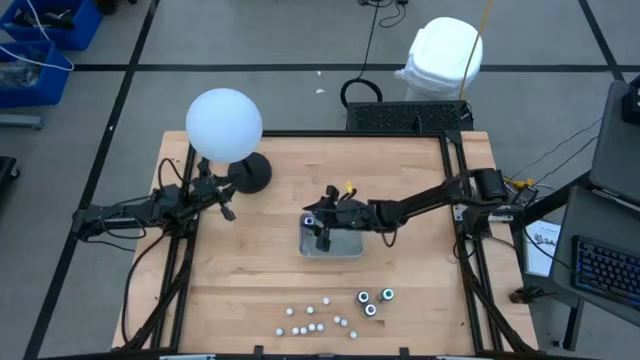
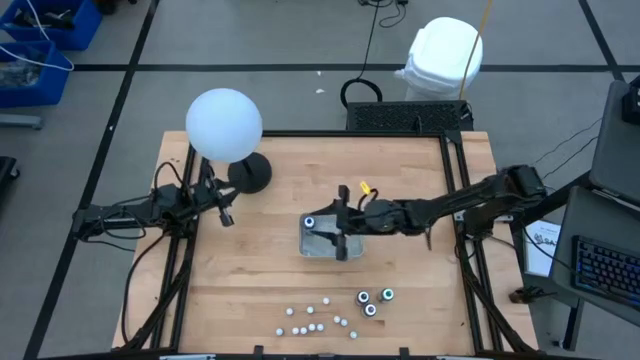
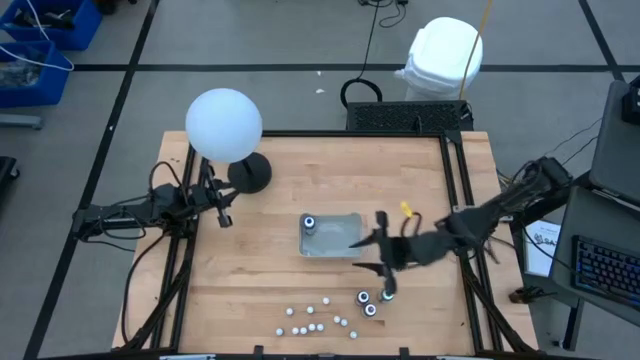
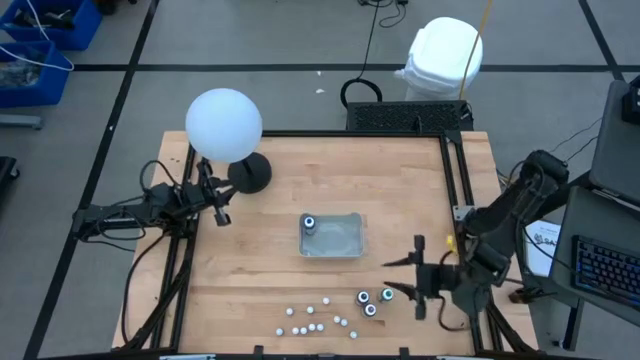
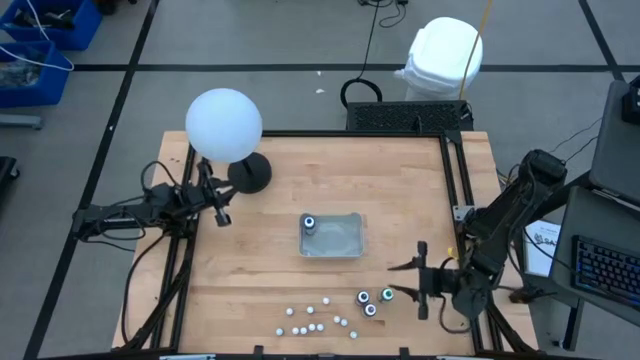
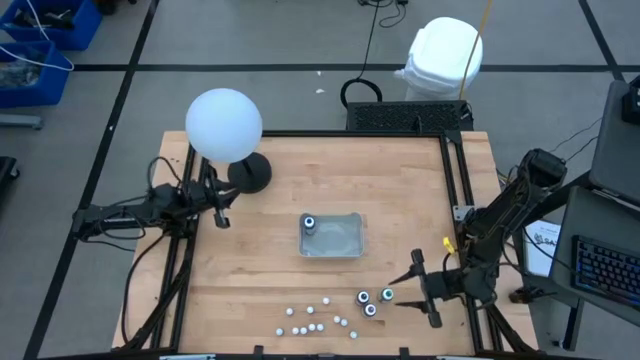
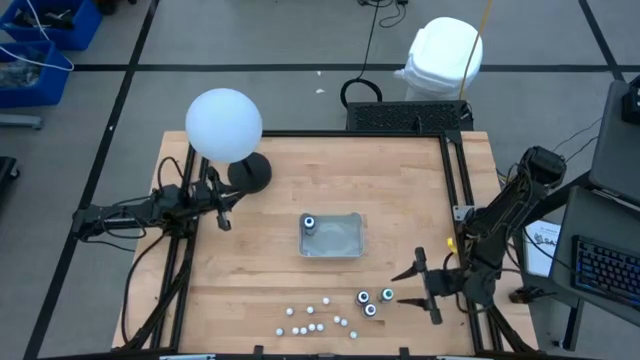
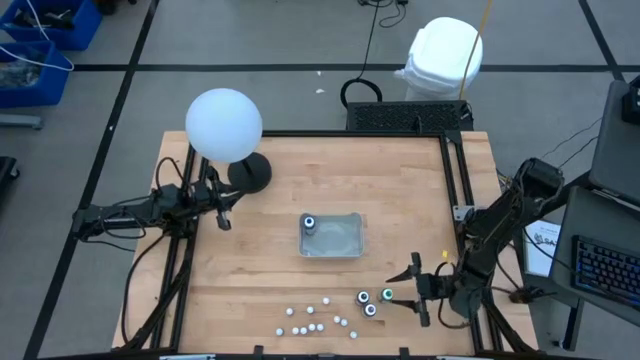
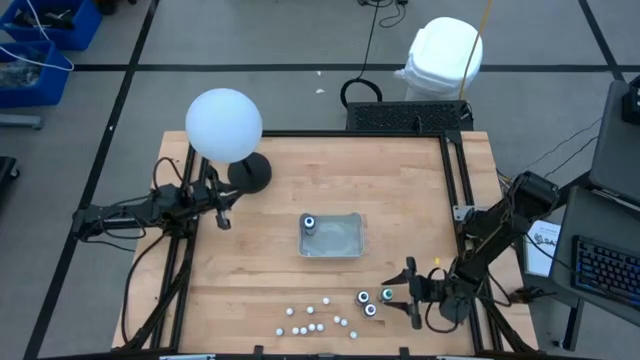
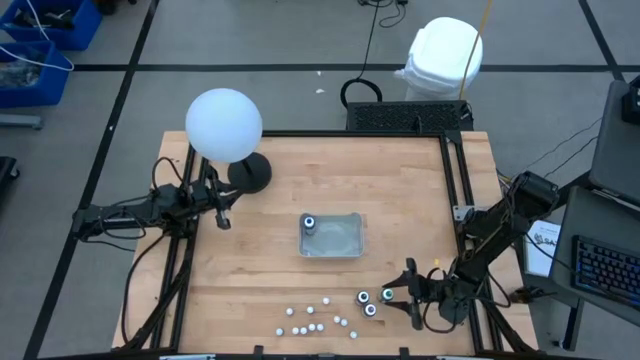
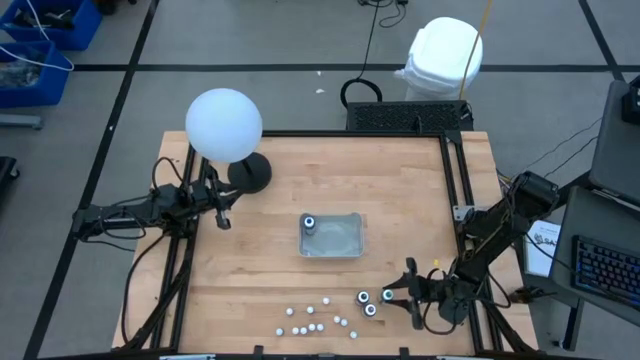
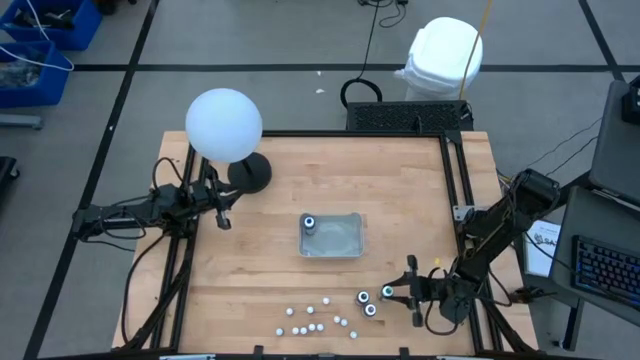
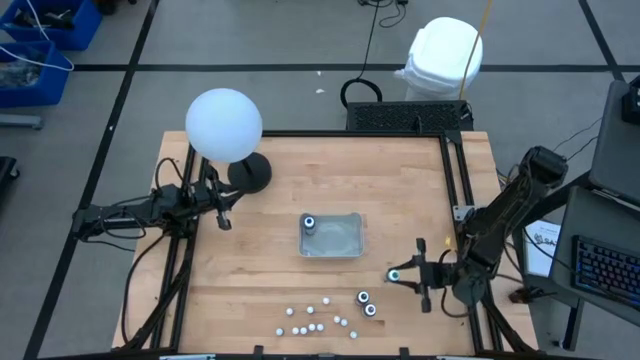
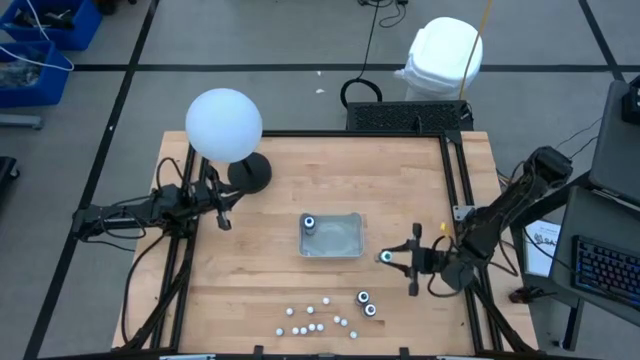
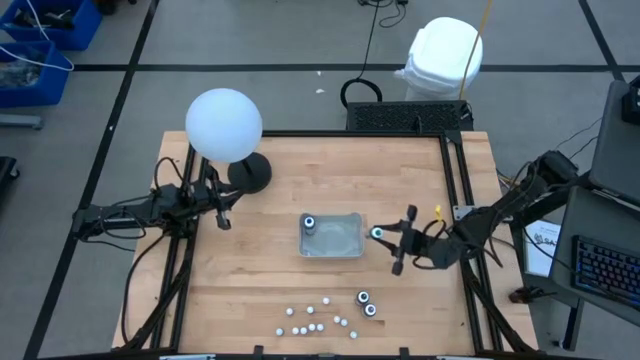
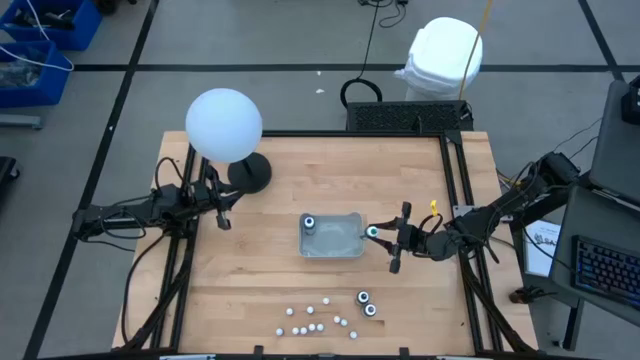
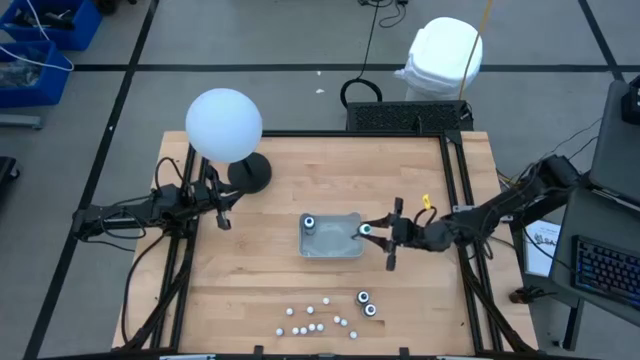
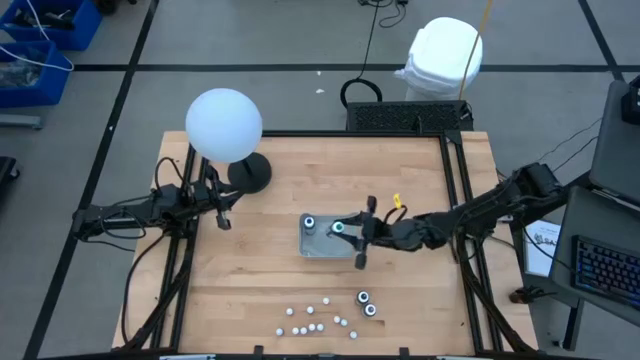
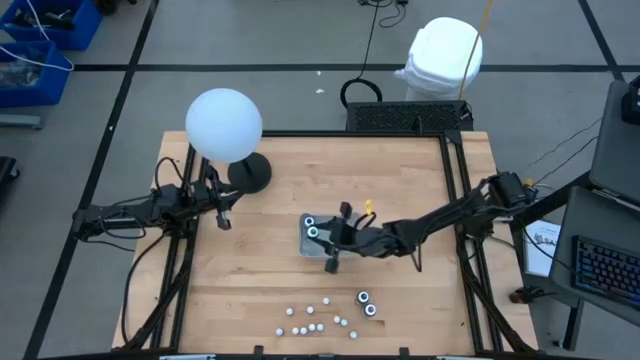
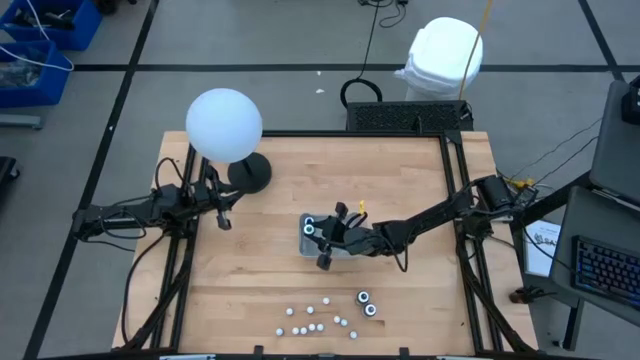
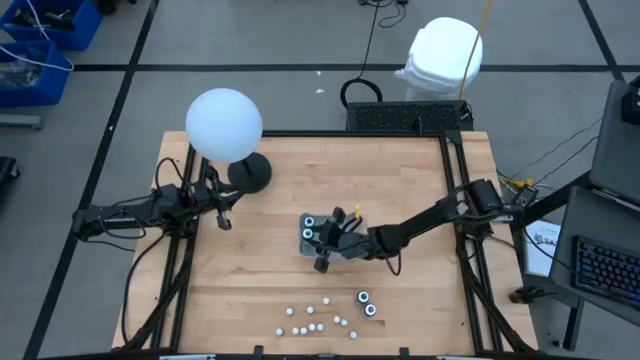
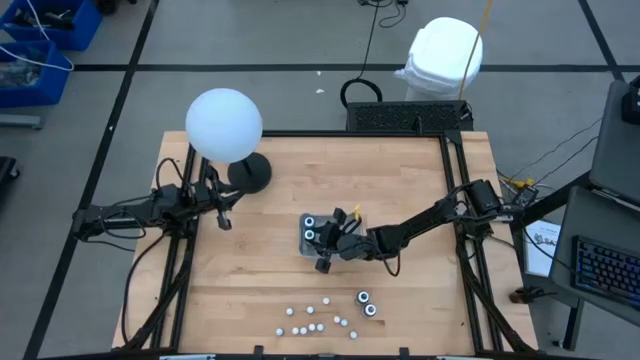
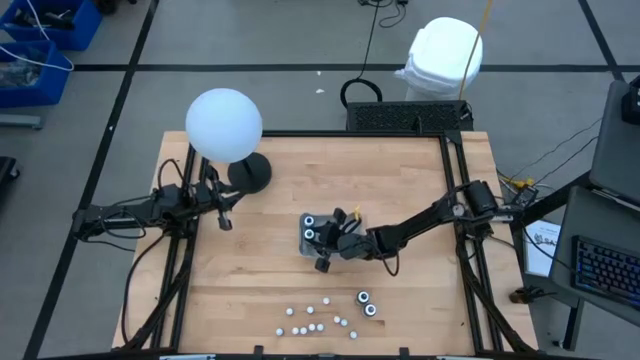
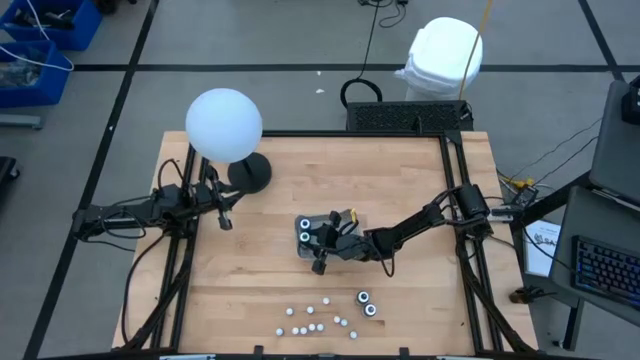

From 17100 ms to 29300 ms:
Task: Pick & Place food coloring
Put the large green food coloring bottle into the gray bin

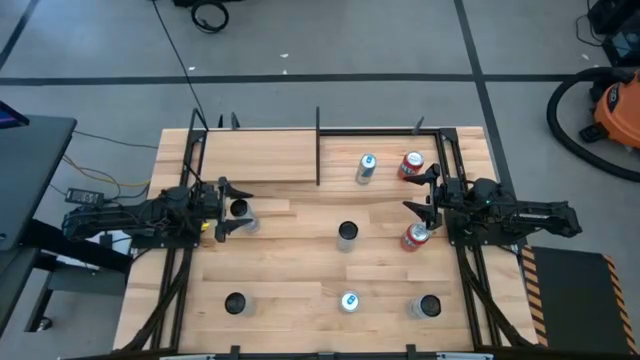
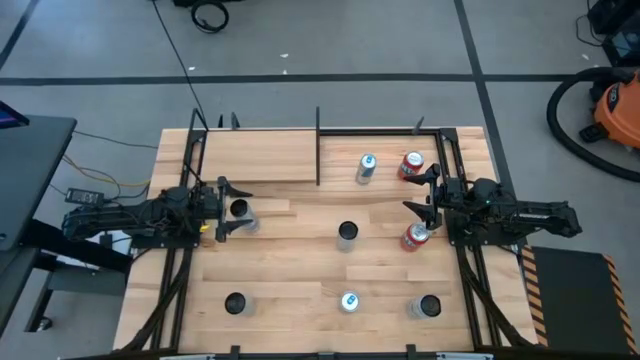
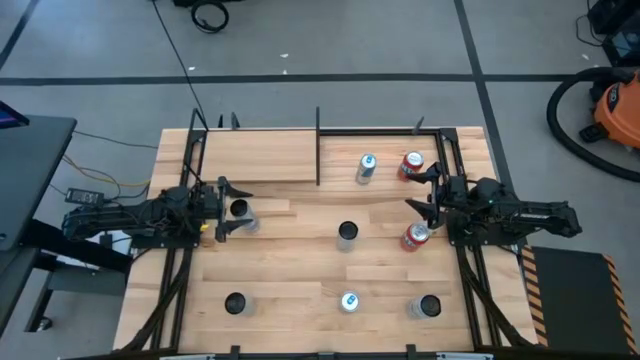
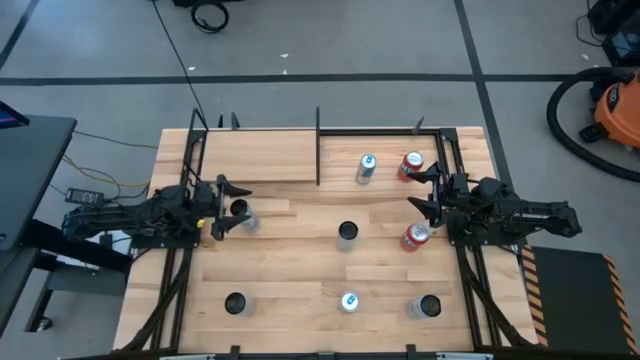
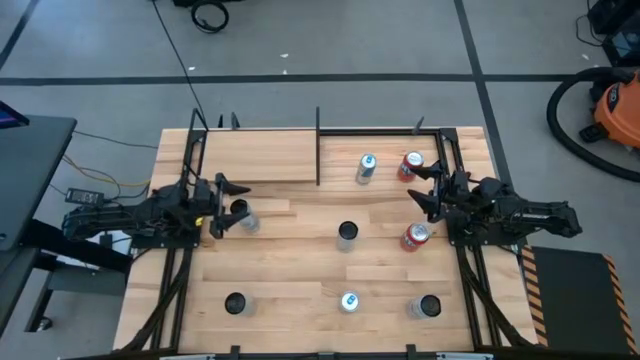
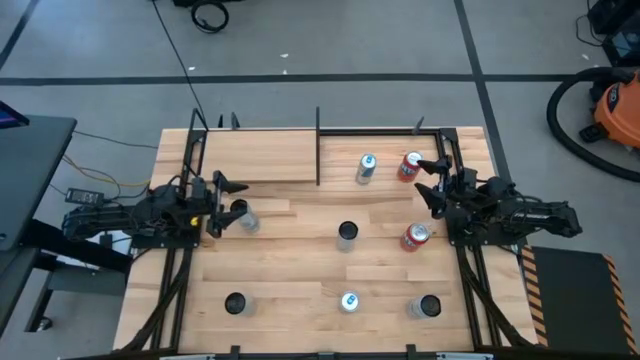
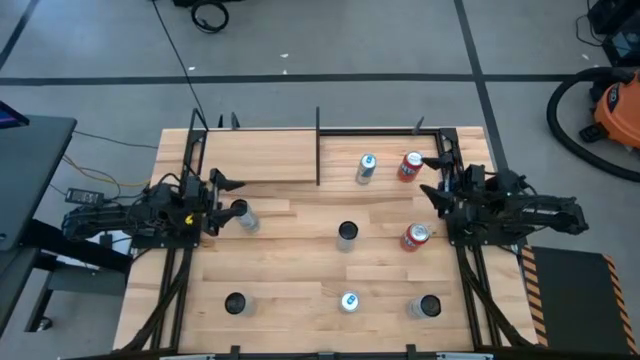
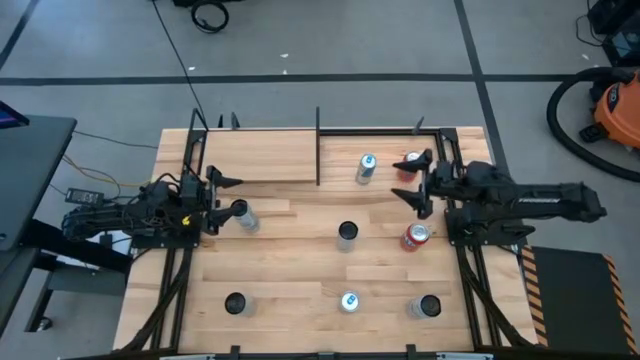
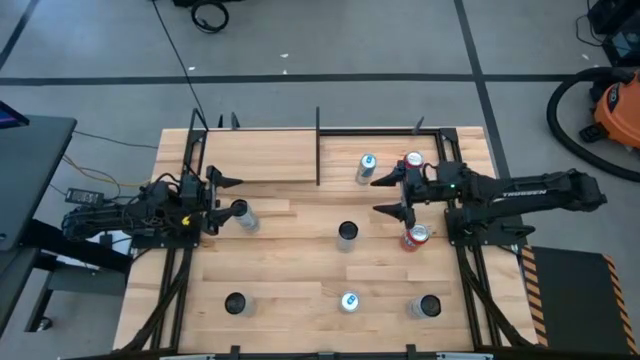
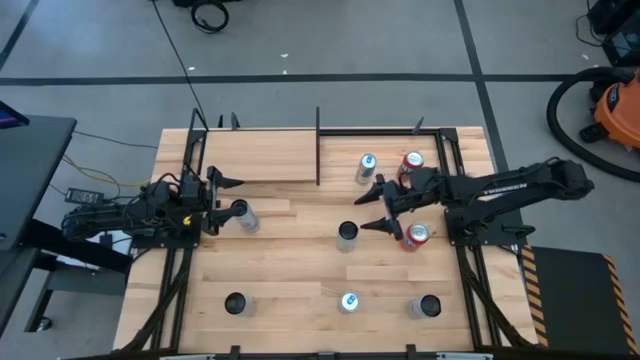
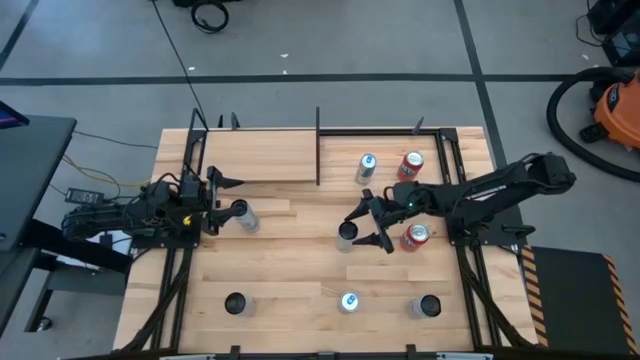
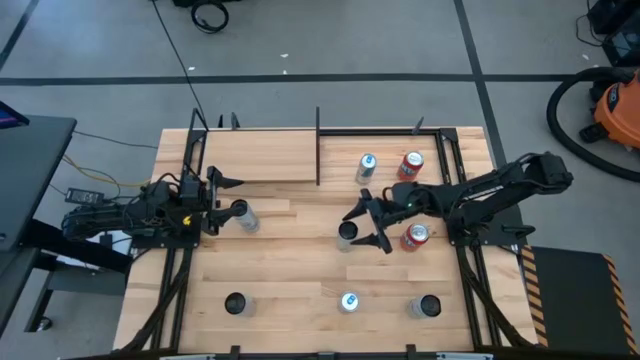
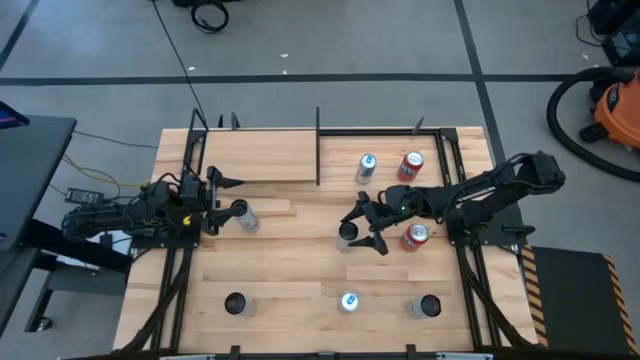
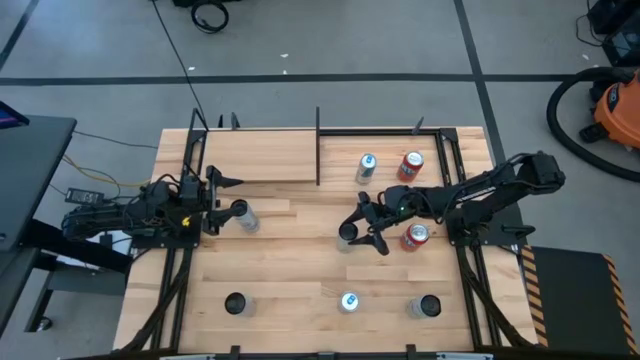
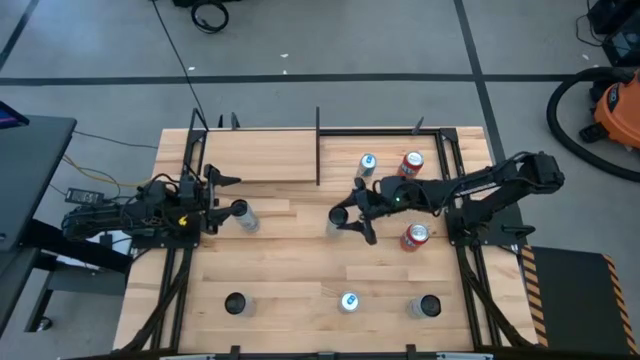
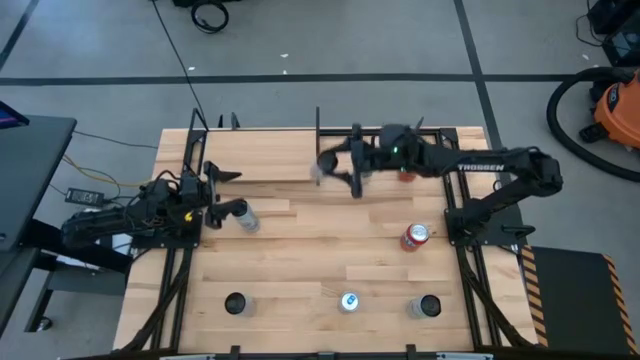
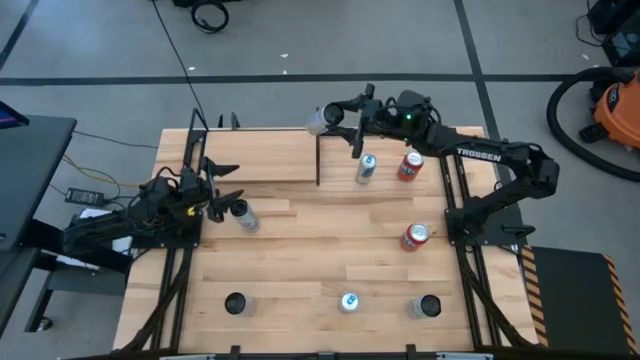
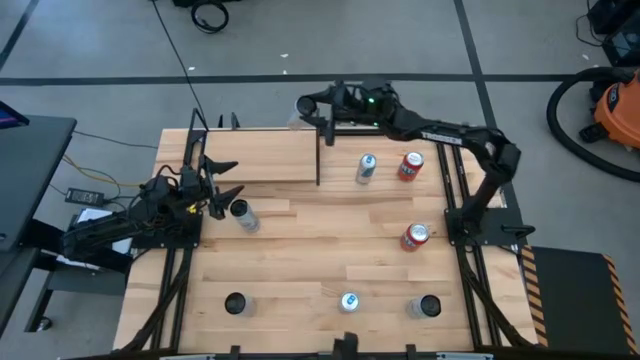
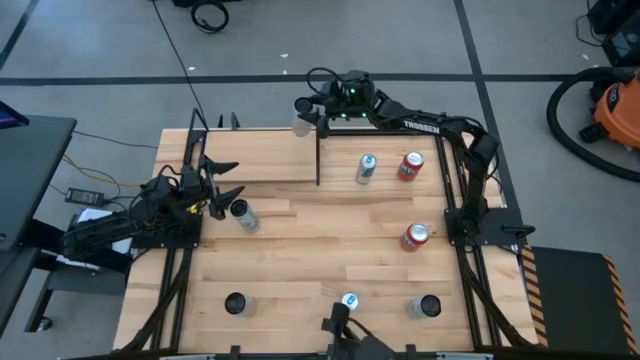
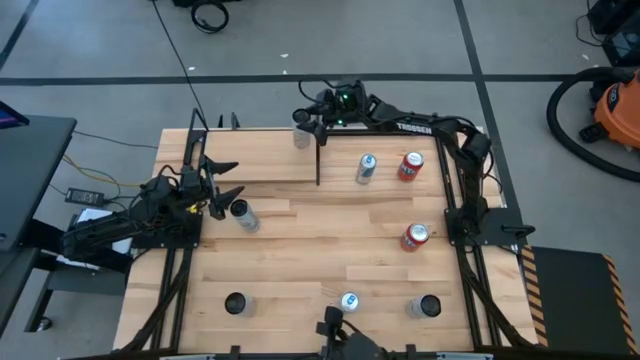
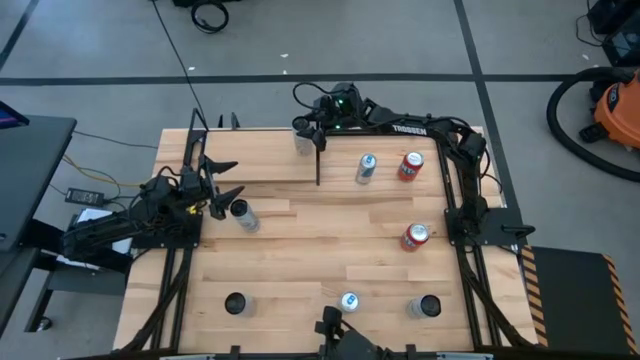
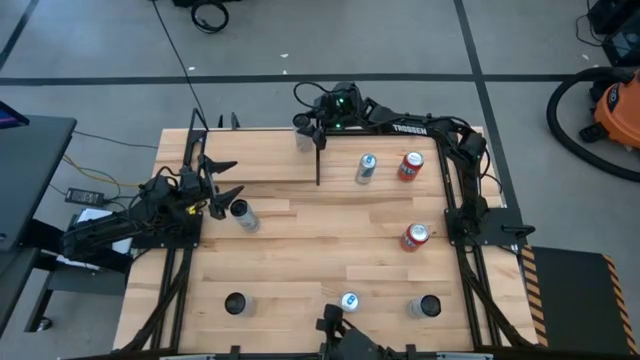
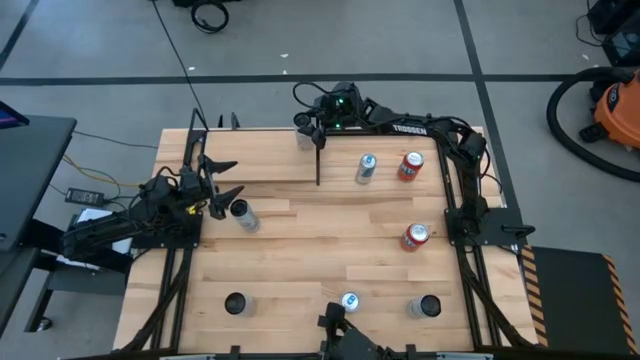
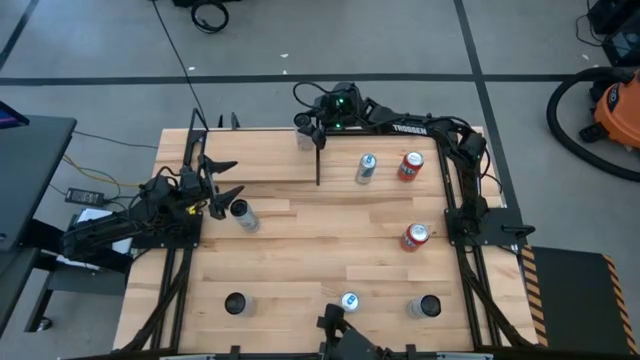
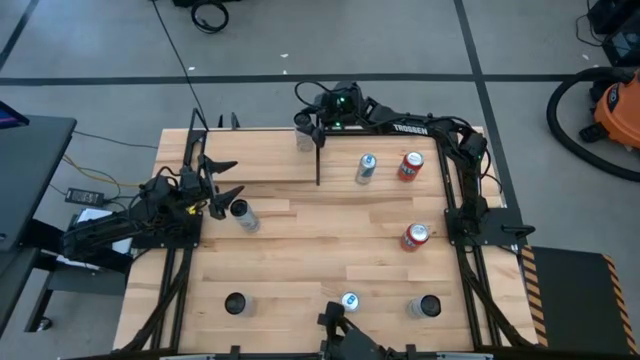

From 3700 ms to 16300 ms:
Task: Place canned beverage on shelf
Put the top white yellow soda can on the shelf
